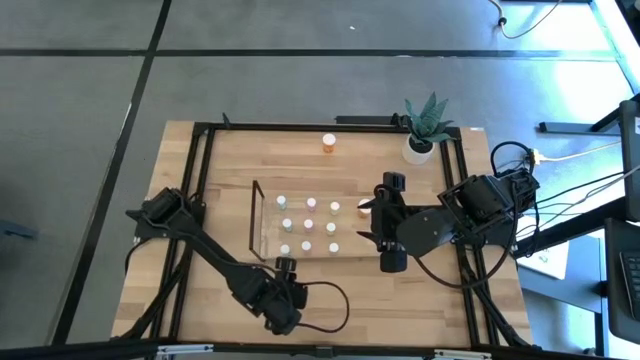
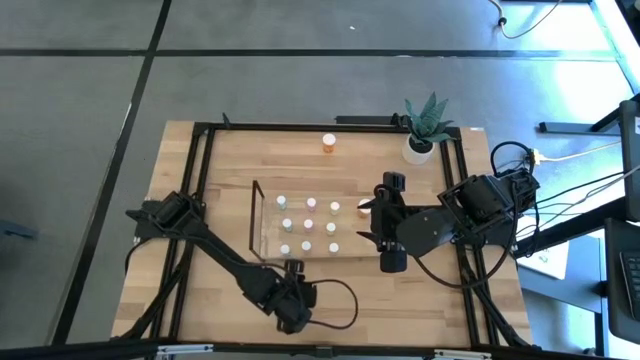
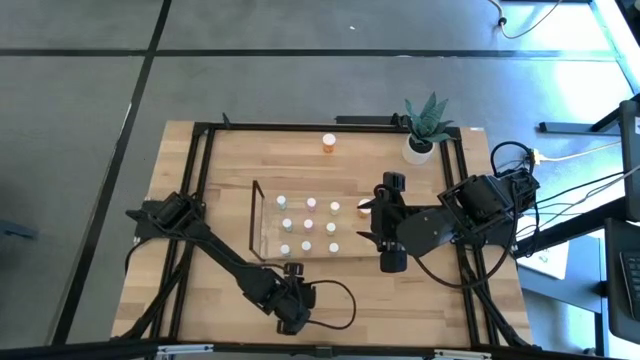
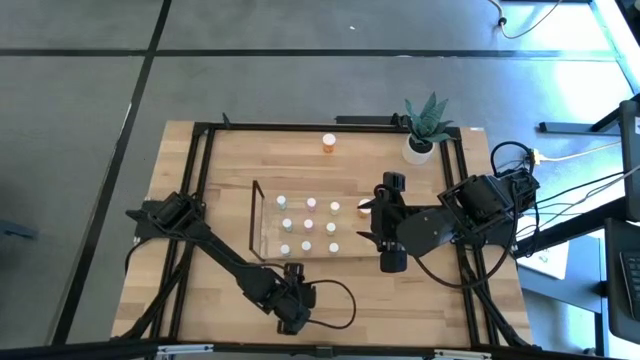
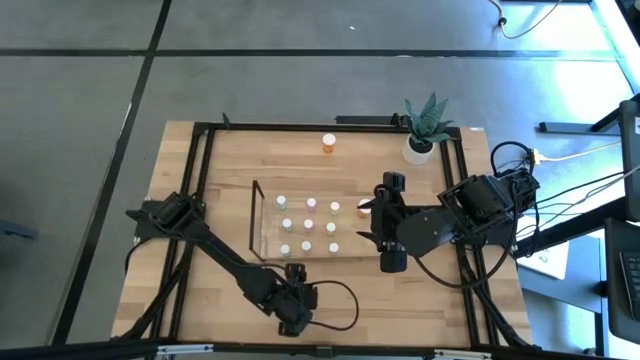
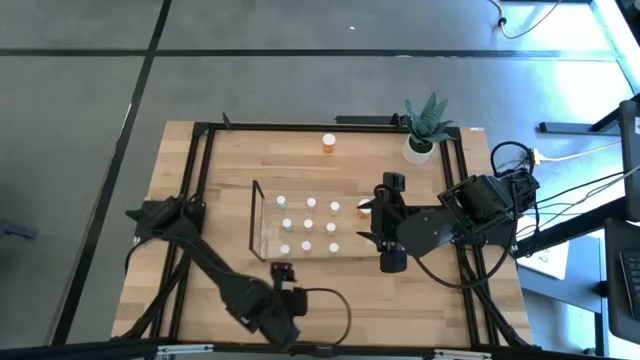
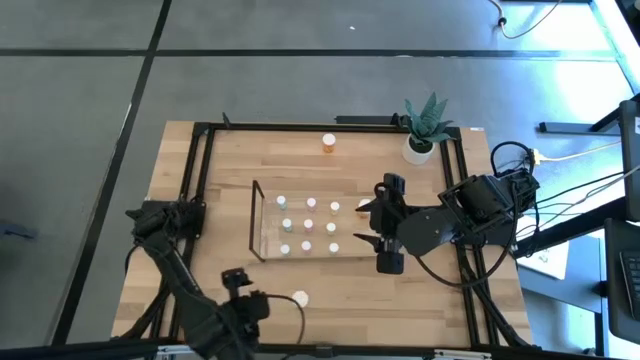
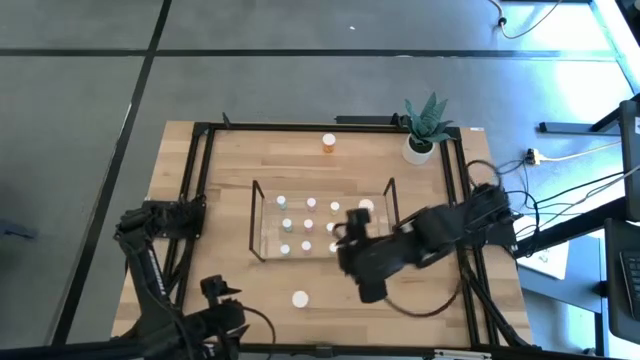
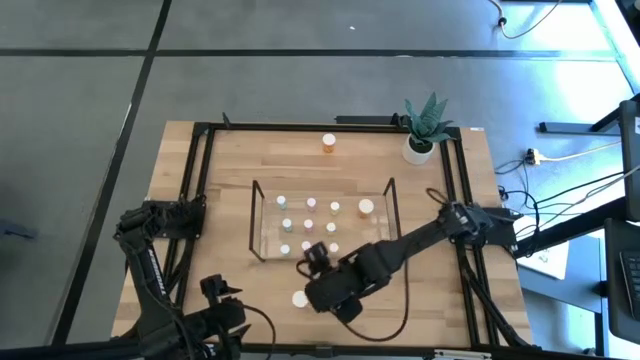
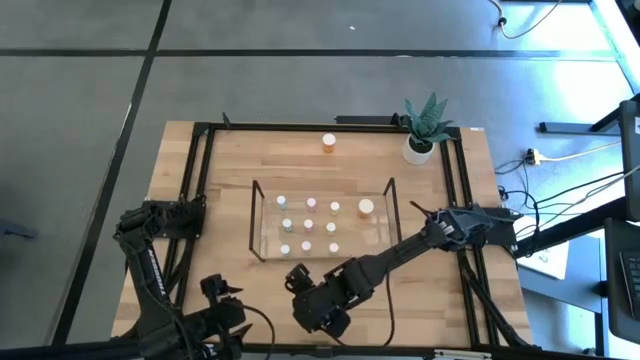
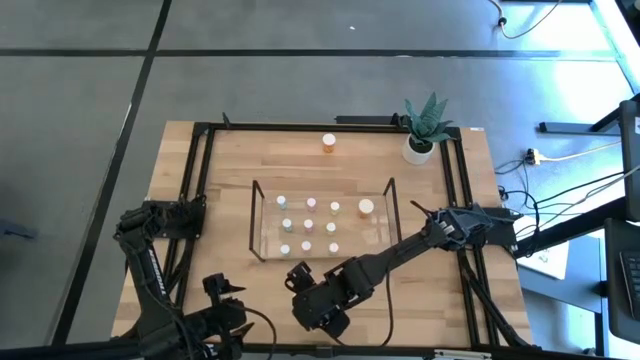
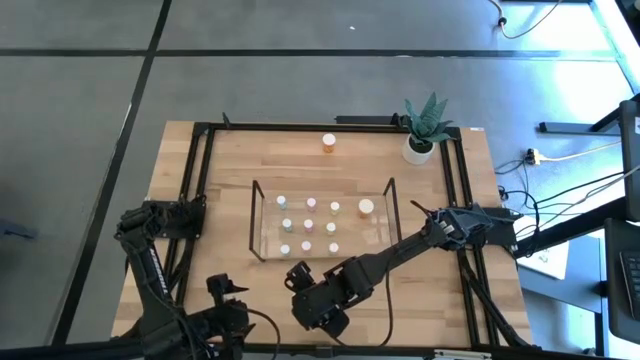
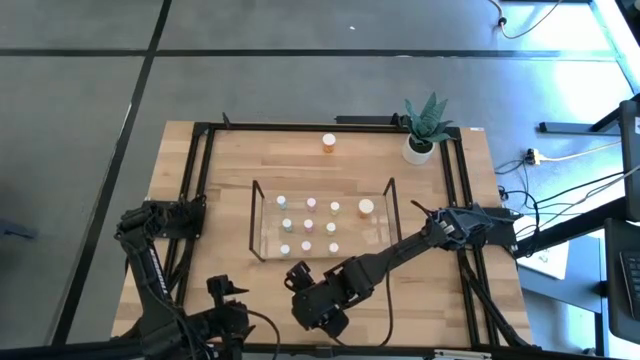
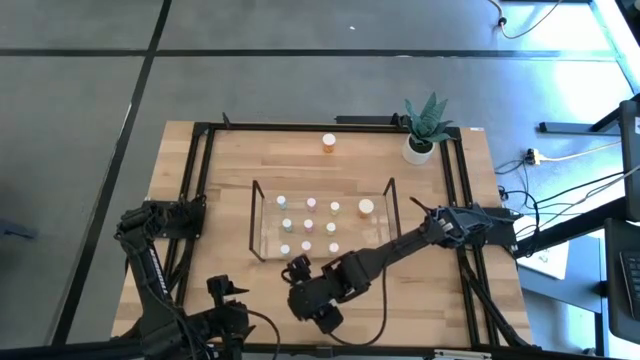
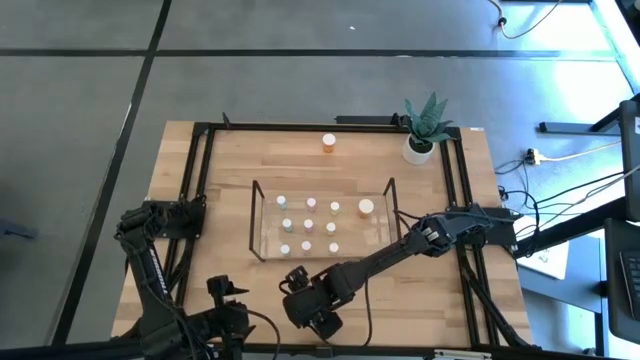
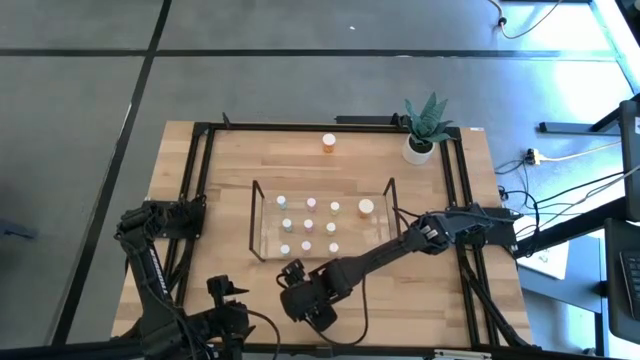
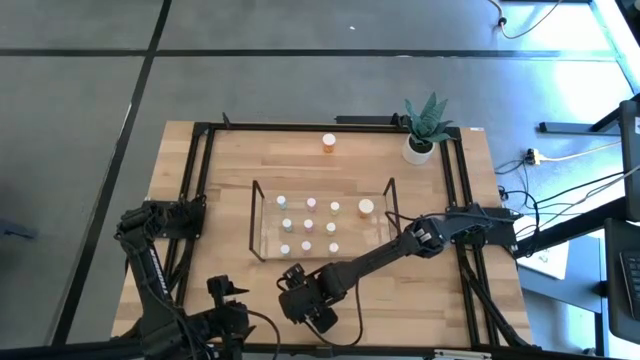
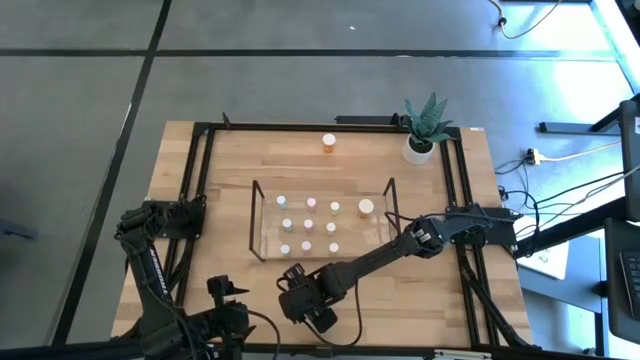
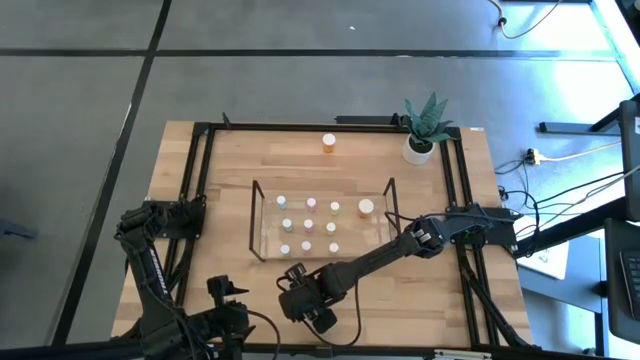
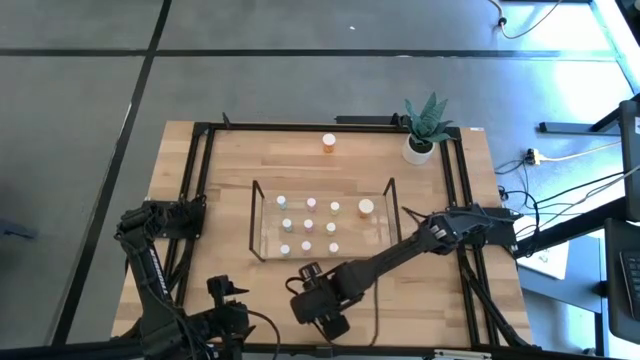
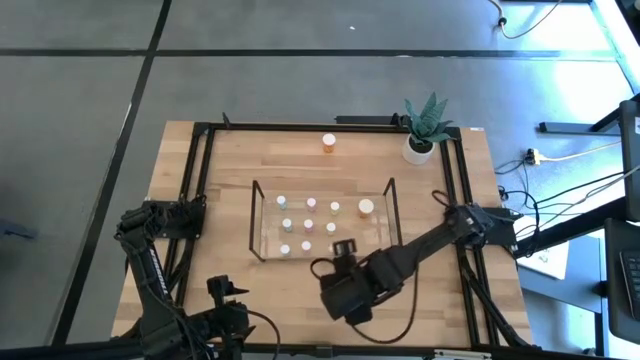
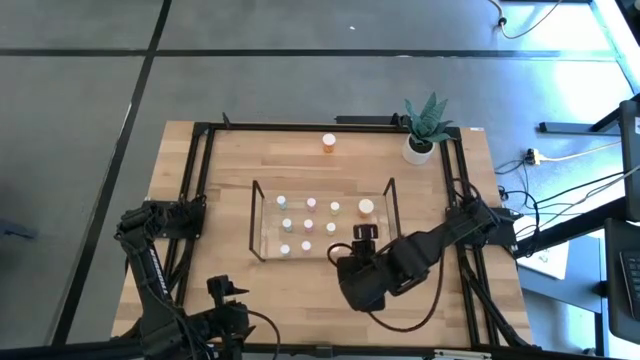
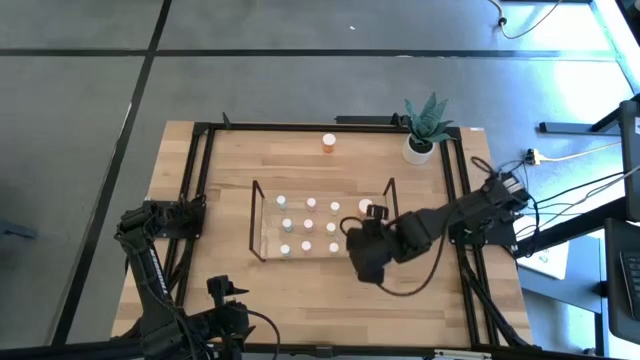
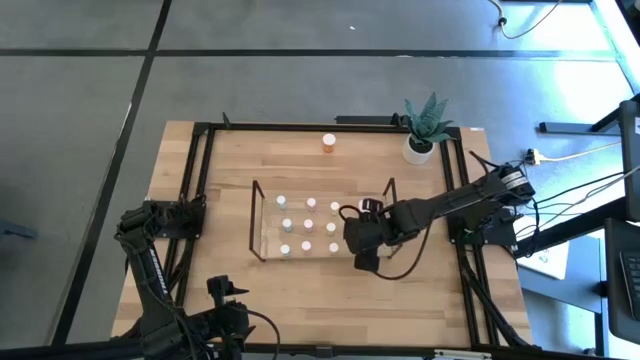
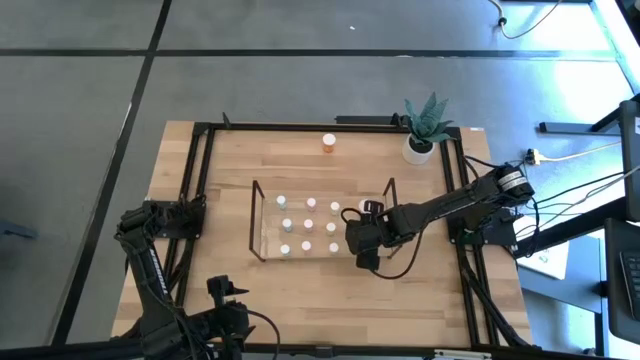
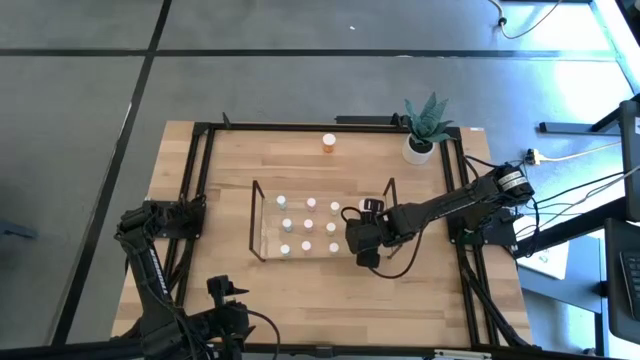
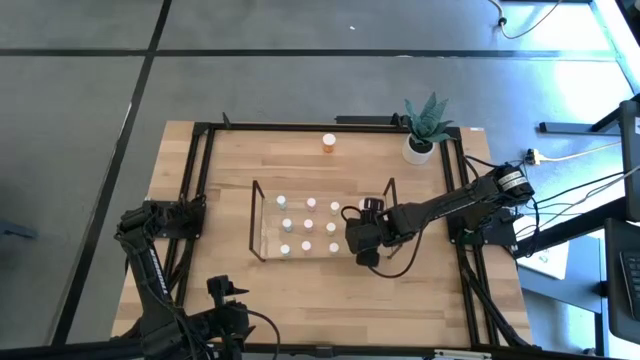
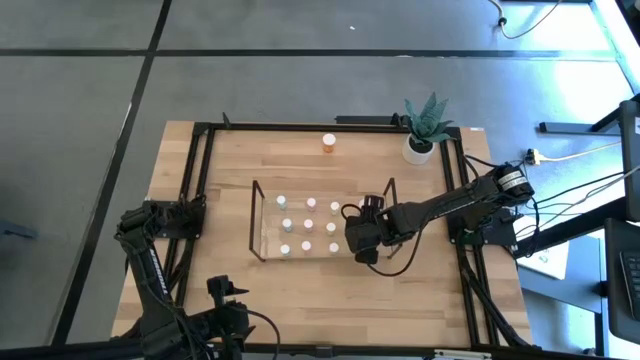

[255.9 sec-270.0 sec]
Task: Pick and place medicine bottles onto shelf by color
Put the left orange pill bottle on the shelf aligned with the other orange pill bottle

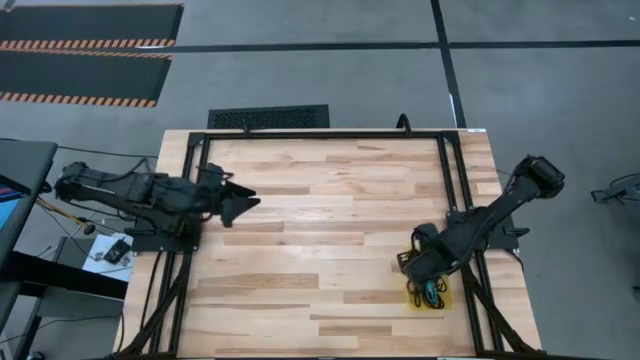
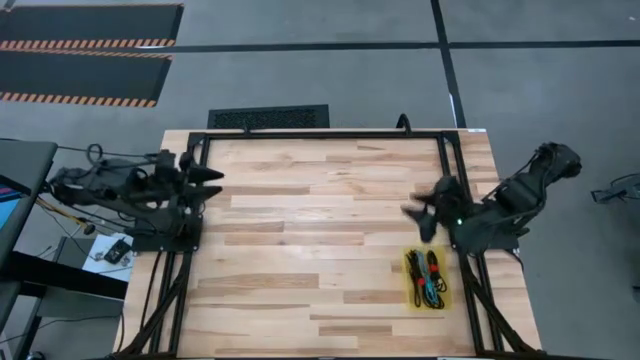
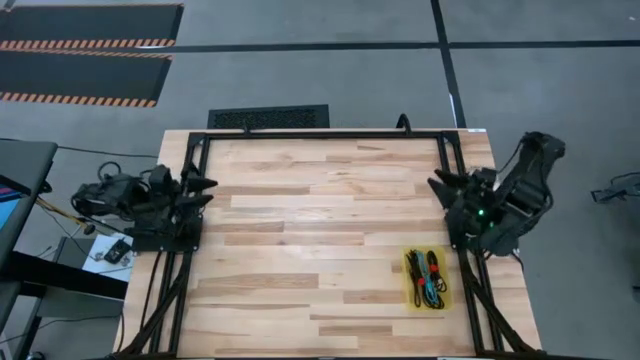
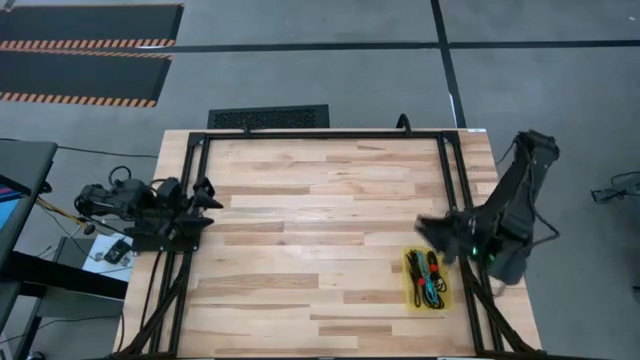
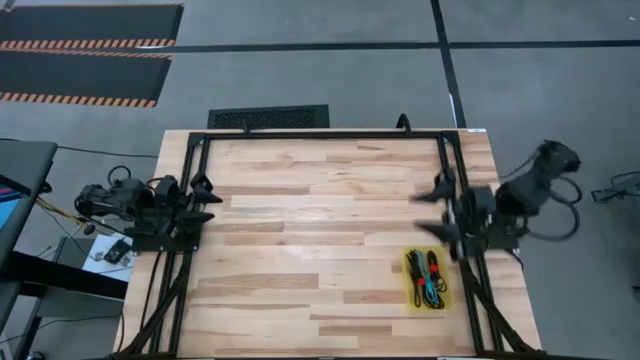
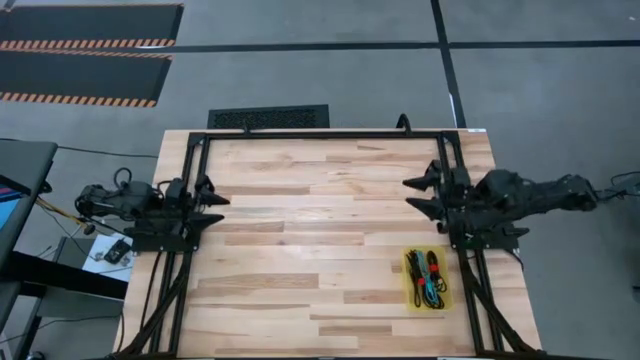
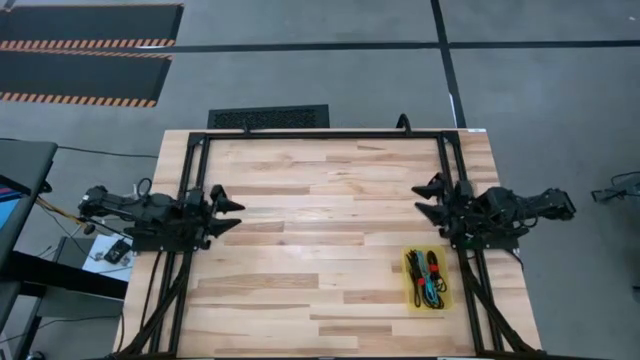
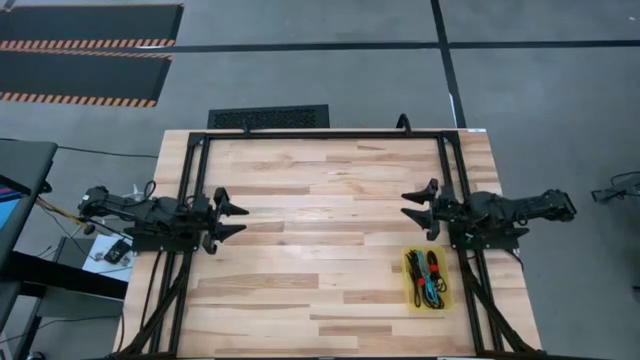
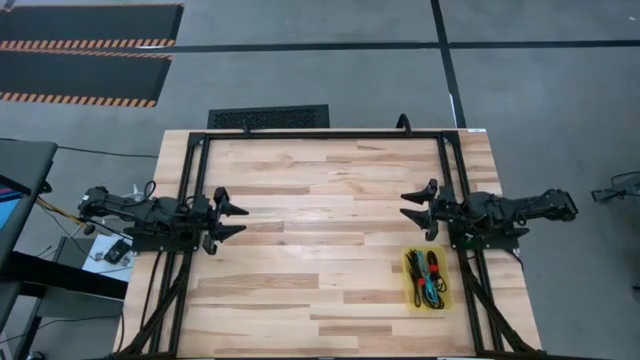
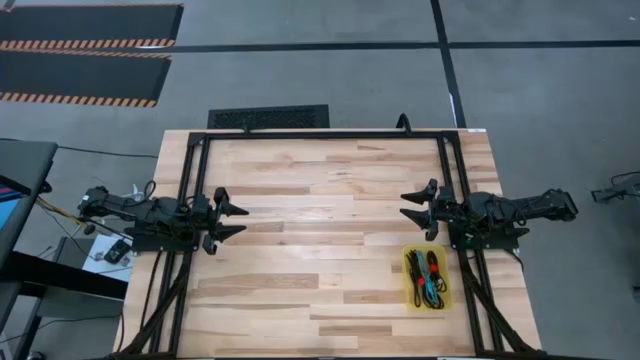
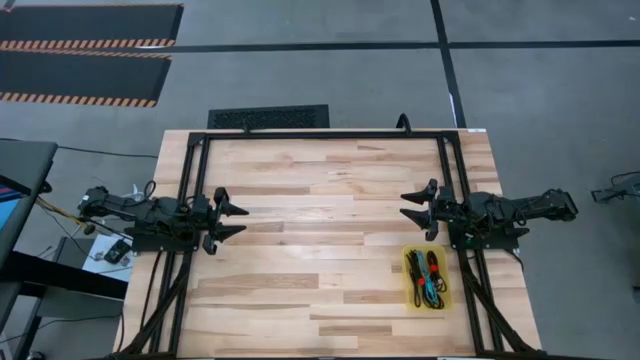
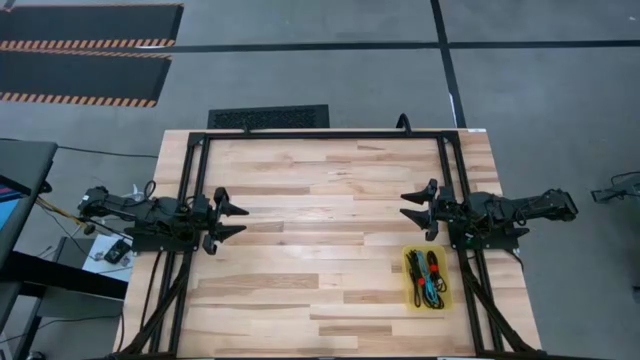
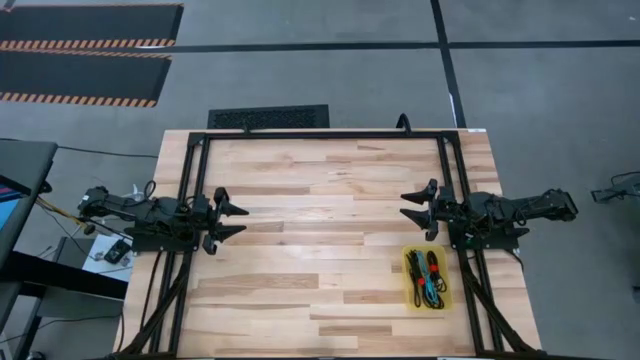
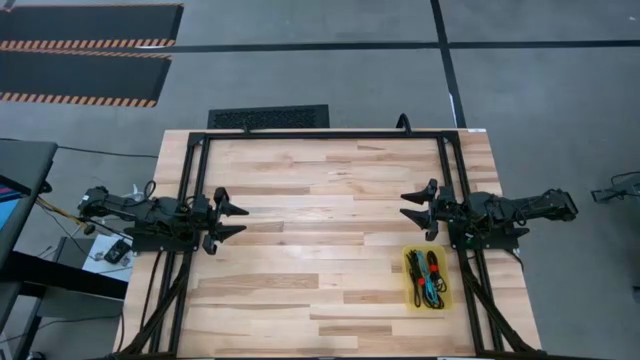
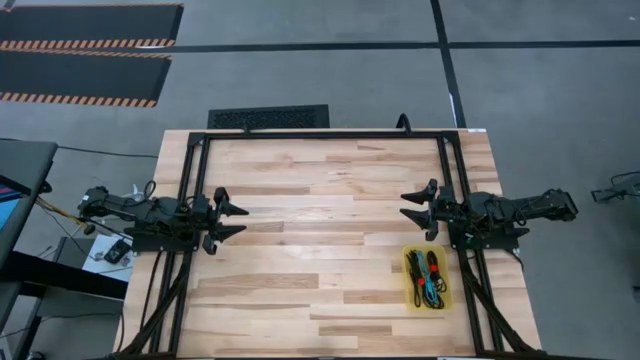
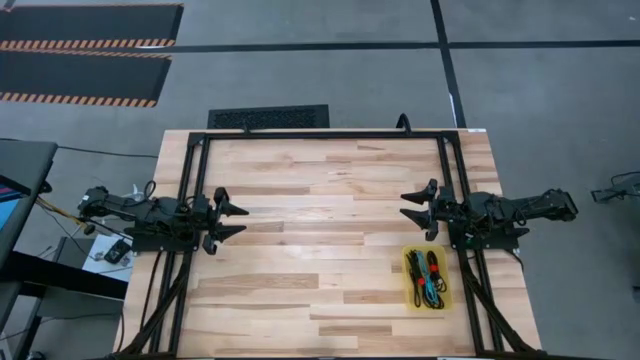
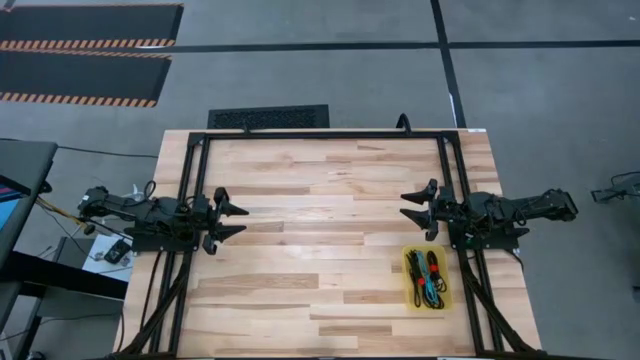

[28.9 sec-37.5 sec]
Task: Pick and place USB-C Cables
Return to Home Position
